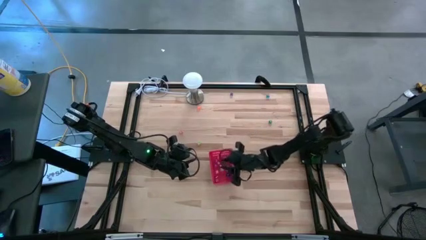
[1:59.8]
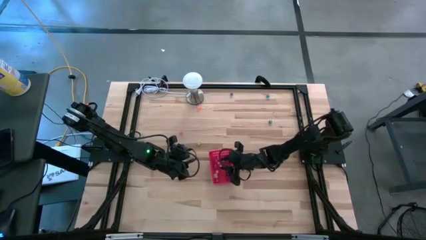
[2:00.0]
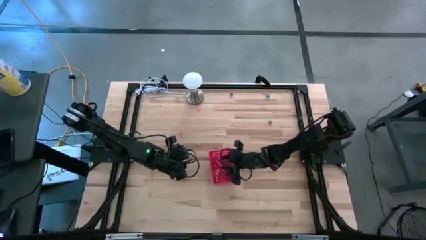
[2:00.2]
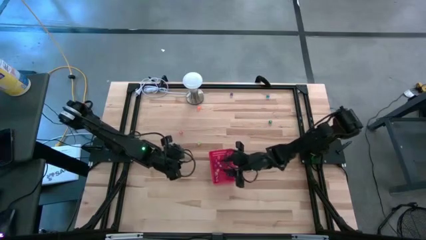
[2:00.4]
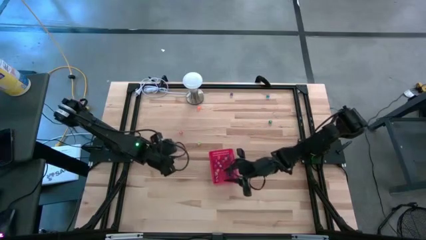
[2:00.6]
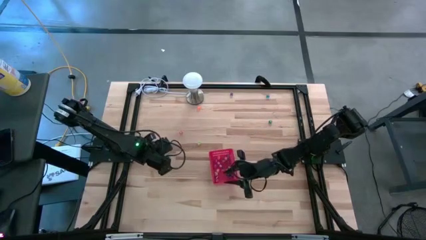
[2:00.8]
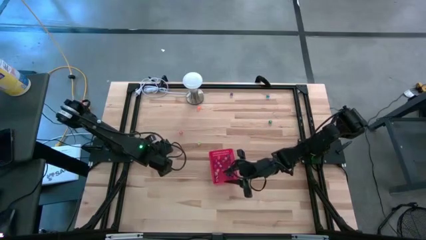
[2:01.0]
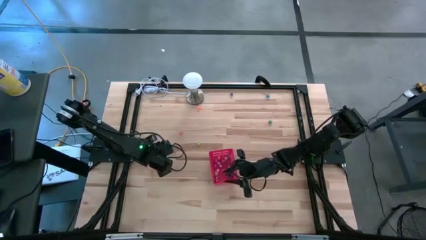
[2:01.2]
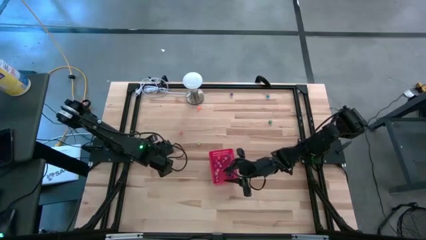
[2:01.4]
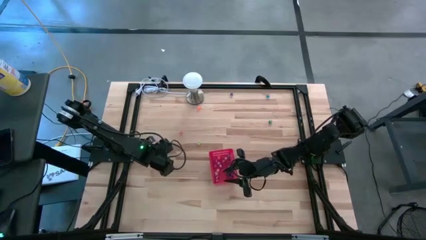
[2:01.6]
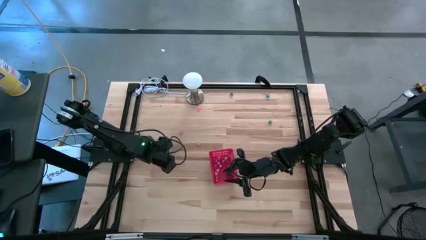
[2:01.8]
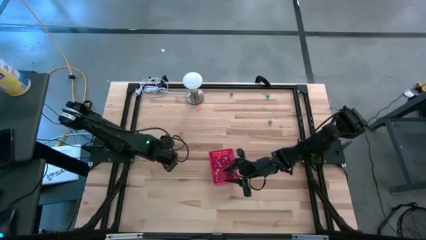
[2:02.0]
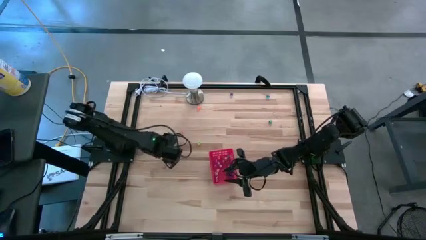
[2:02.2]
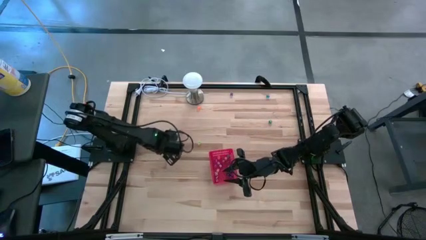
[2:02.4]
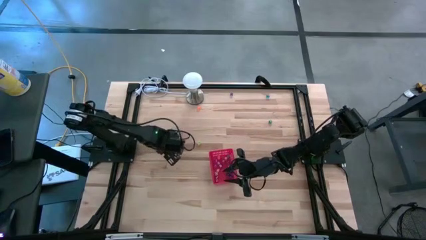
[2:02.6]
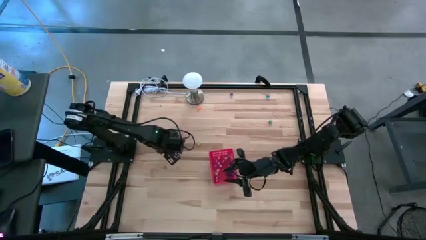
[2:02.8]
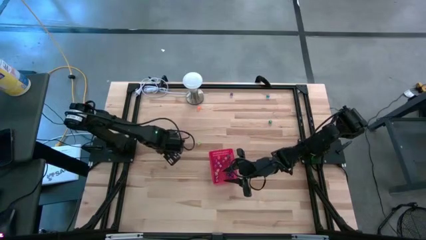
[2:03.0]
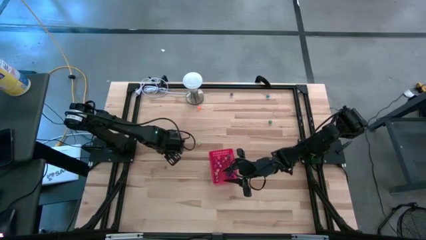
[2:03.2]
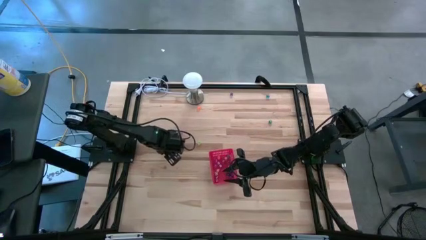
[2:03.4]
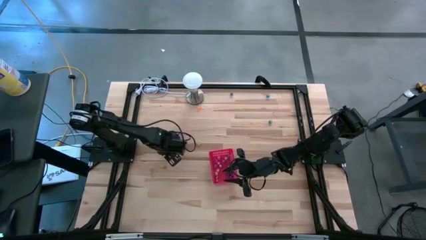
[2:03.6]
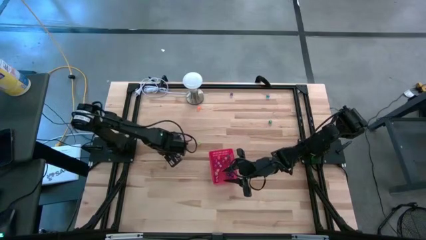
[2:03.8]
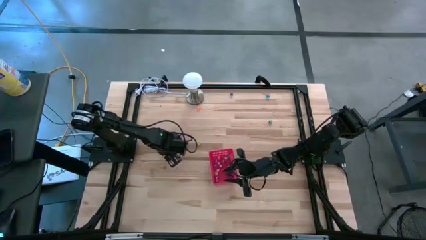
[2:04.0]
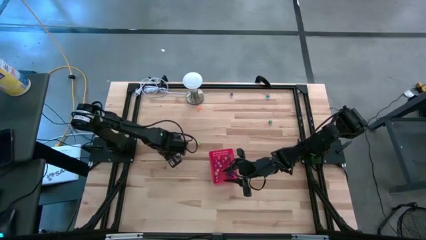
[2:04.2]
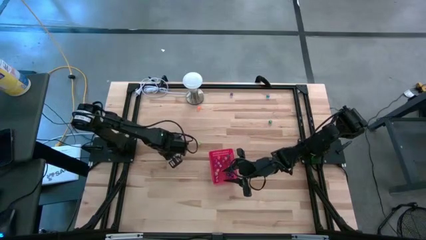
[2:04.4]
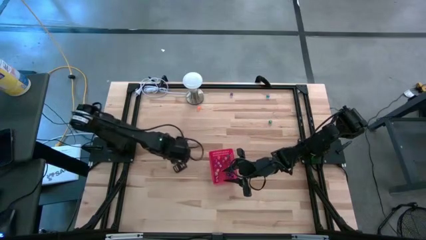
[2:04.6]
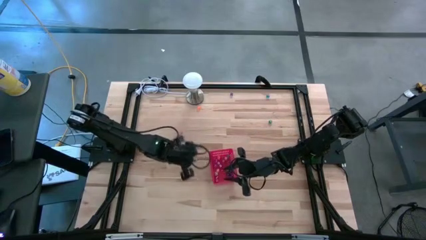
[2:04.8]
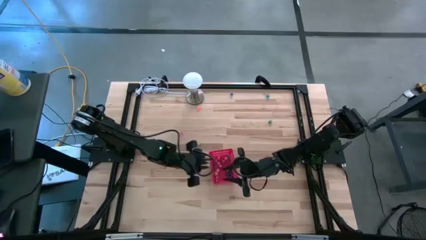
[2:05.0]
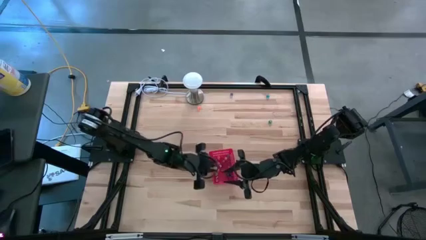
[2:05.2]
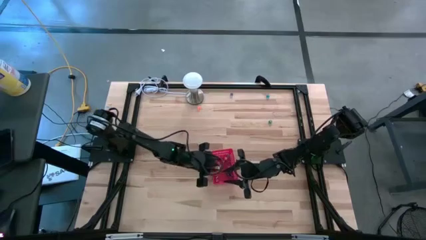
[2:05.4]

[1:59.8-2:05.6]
Task: Pick & Place Dice
Put the light green die into the red basket

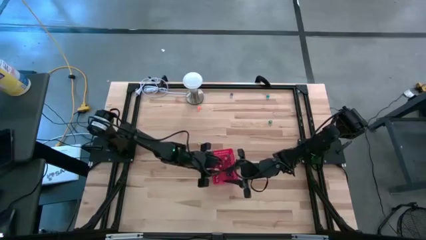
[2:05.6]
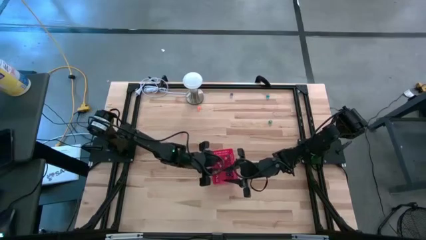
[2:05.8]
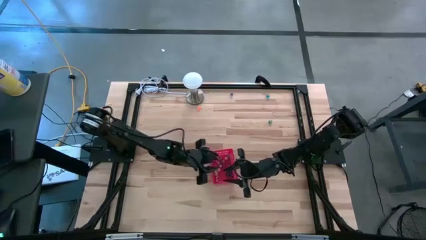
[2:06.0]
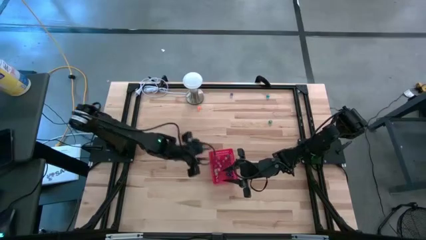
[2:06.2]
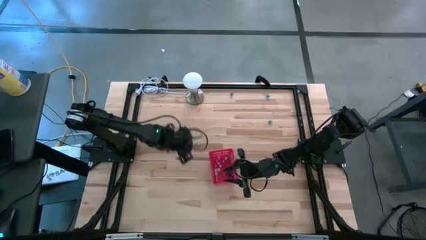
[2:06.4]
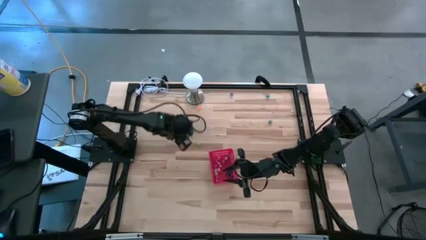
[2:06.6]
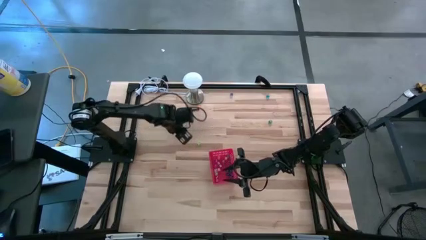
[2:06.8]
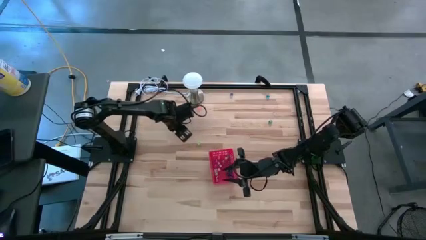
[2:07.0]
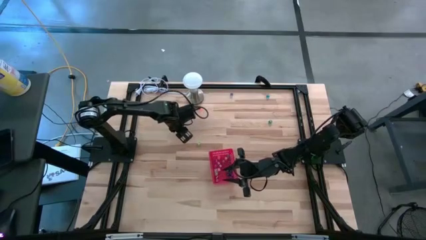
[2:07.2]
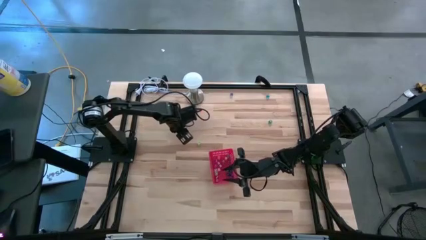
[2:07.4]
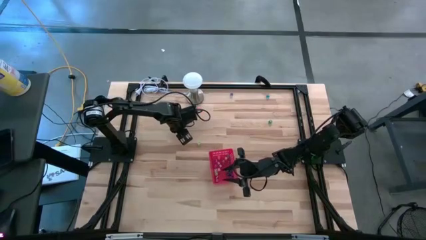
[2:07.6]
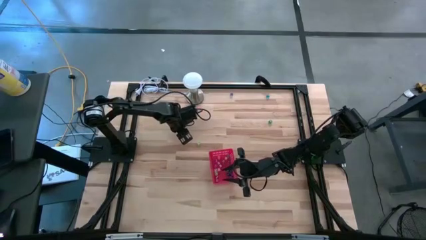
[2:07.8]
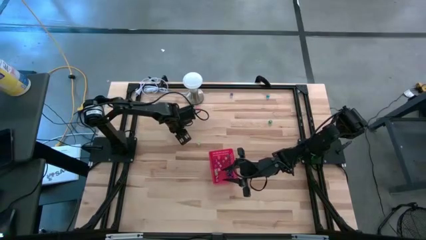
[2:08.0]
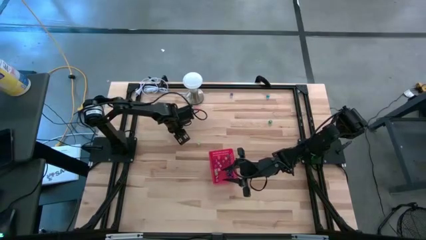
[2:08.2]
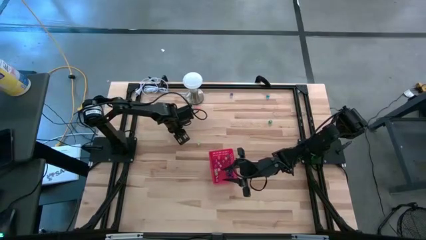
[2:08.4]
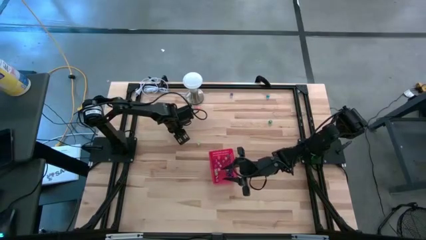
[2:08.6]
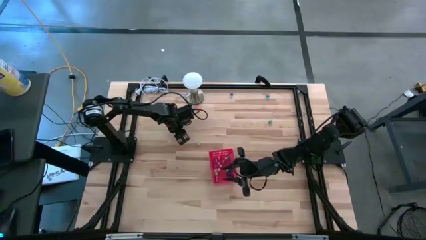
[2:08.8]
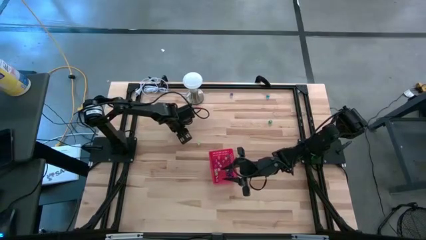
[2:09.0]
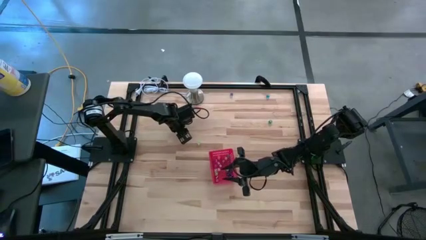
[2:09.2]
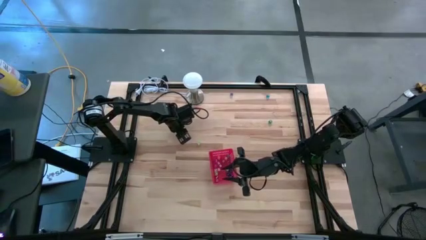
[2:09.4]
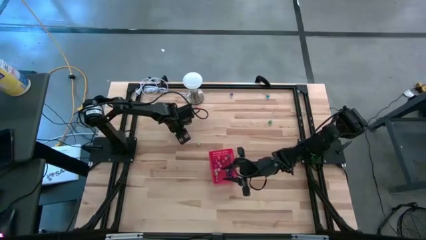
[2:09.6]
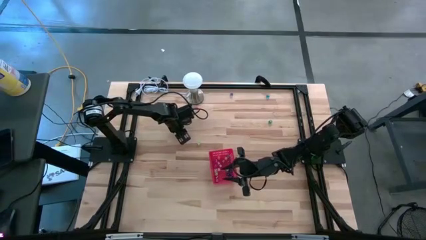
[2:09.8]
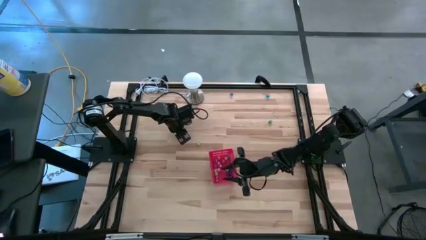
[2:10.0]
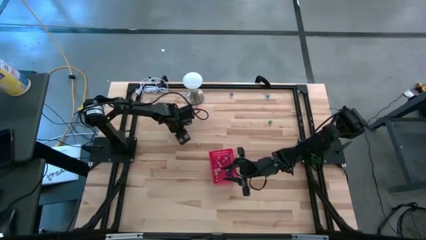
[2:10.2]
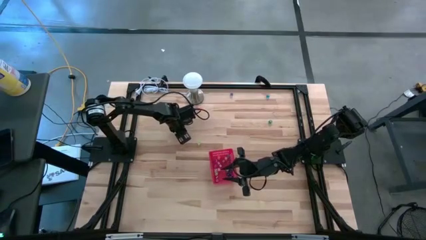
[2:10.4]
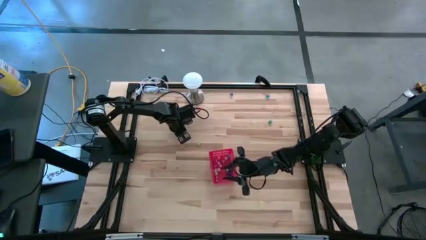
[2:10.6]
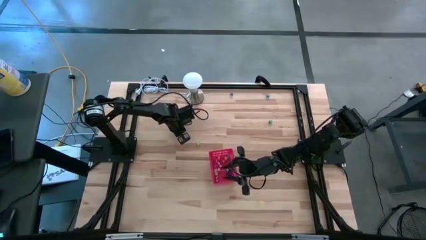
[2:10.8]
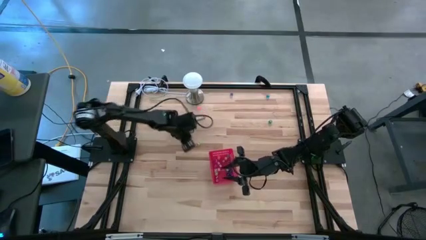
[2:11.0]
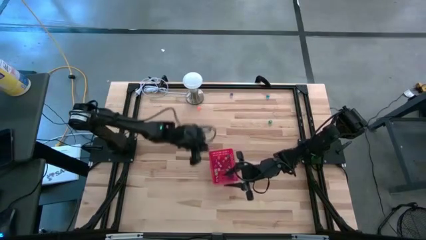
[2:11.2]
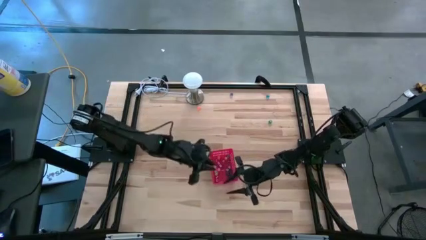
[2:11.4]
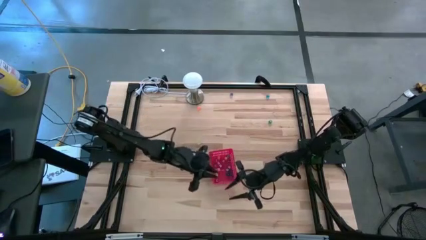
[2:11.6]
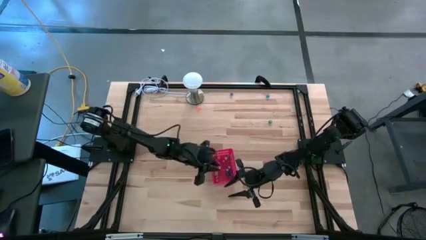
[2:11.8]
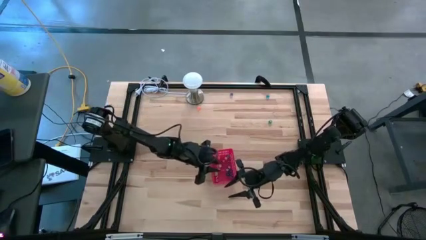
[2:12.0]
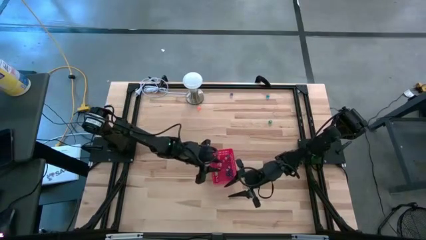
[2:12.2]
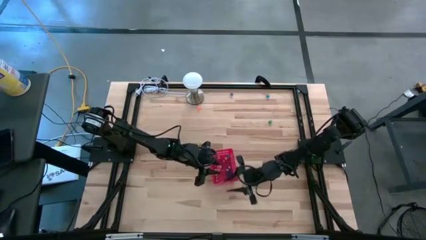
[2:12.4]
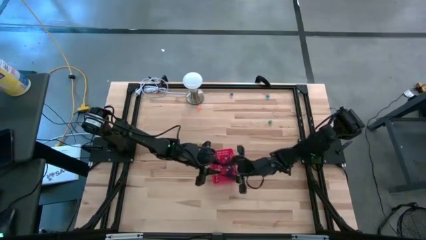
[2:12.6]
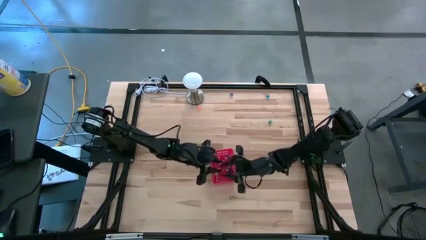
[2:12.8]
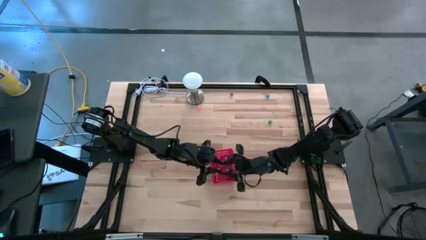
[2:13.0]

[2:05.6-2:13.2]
Put the pink die into the red basket

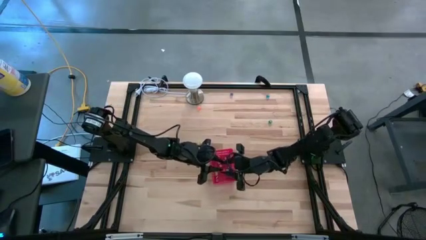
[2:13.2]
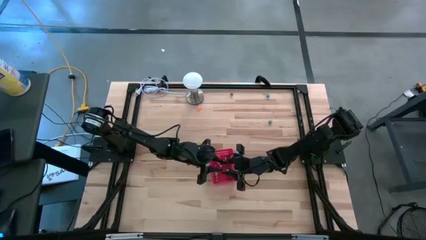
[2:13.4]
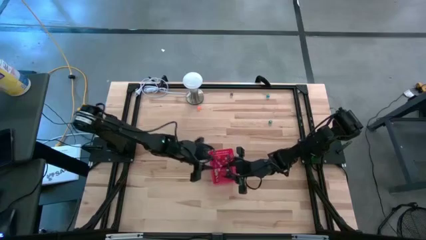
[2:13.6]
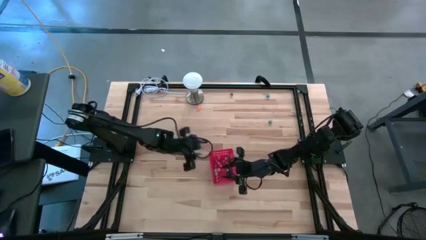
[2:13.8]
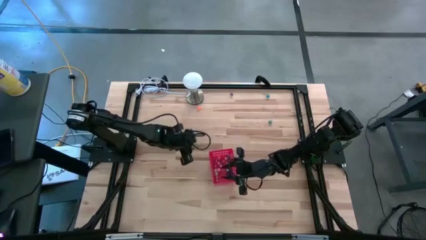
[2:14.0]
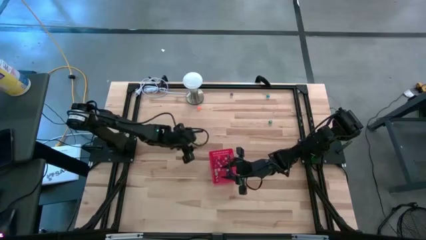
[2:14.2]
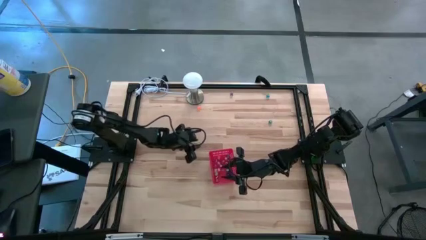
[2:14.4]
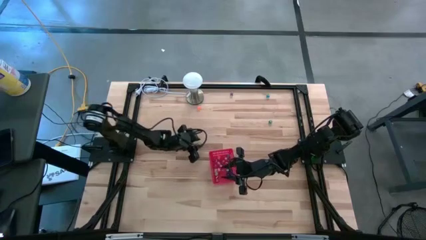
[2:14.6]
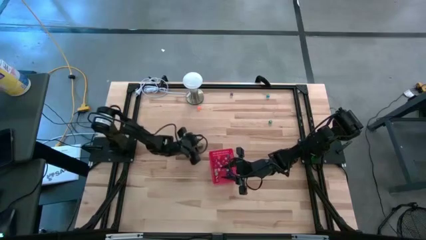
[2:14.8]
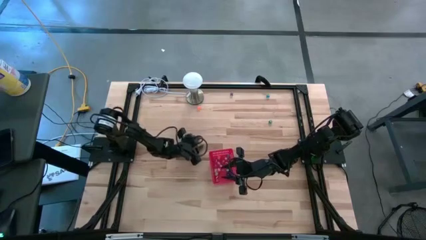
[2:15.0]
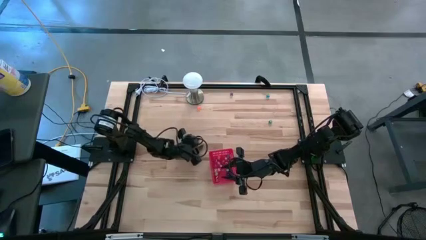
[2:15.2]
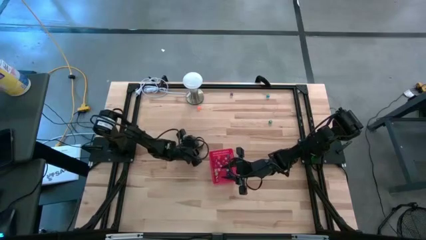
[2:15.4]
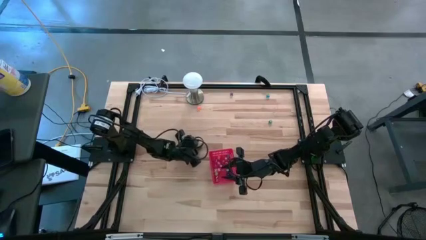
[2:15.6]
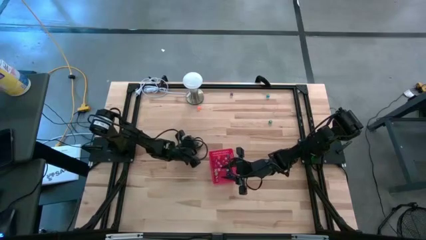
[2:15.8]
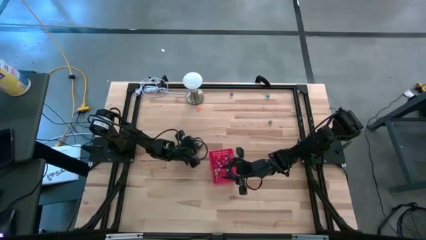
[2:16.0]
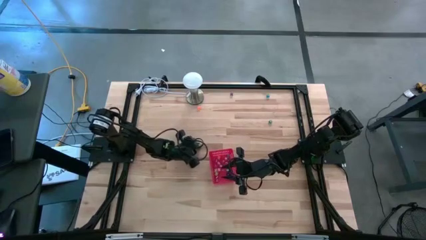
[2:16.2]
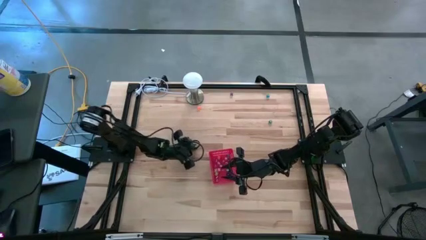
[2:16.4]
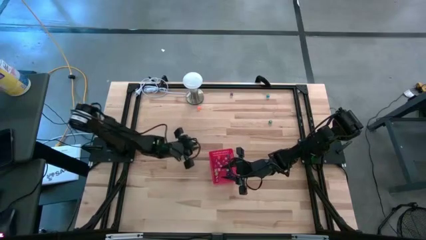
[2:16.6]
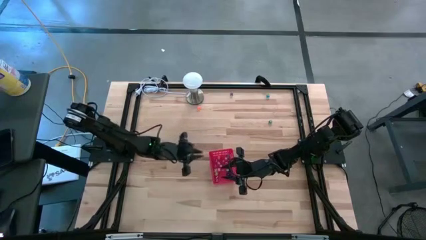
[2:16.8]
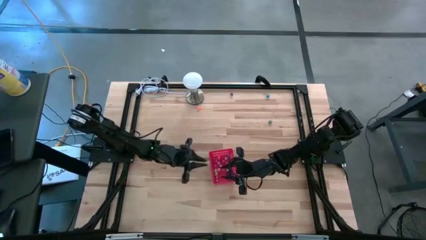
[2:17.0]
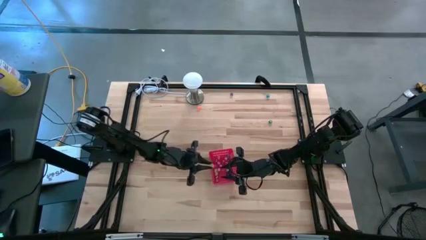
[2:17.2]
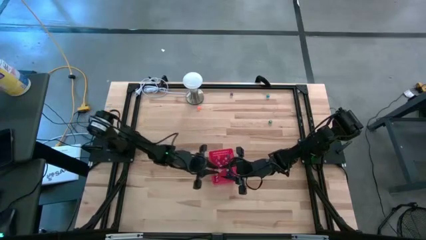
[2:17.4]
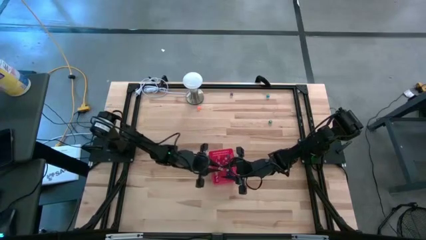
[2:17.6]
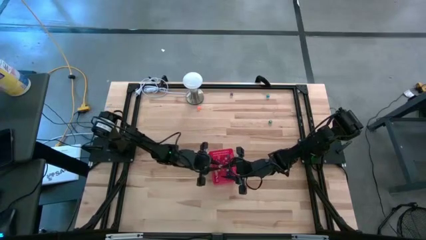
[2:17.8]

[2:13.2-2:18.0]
Put the light green die into the red basket
